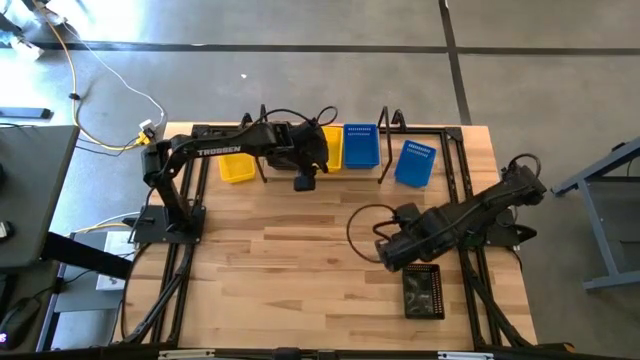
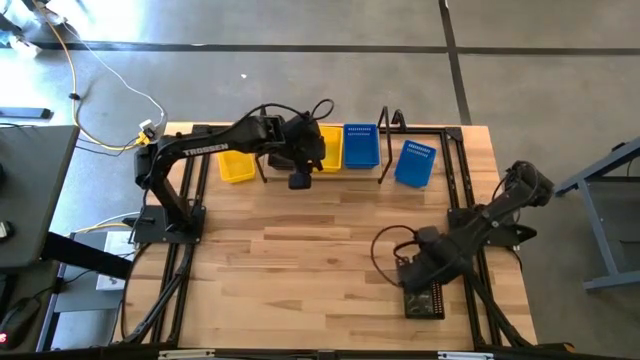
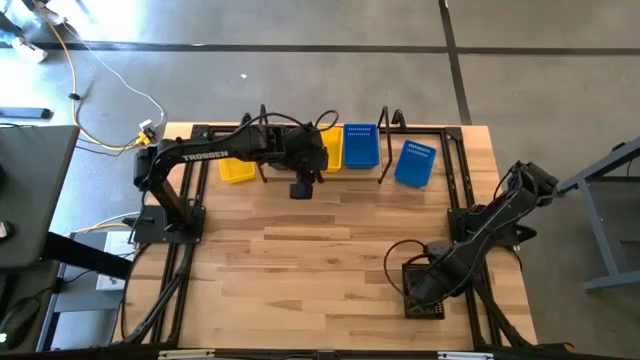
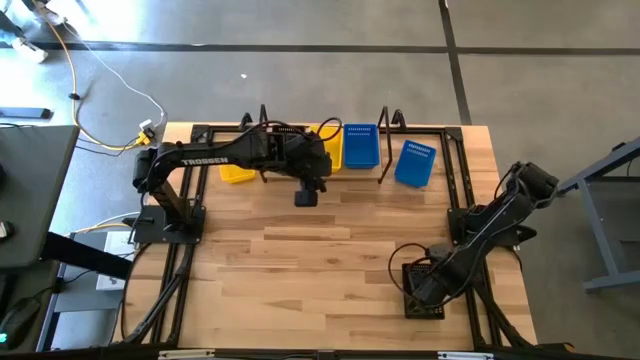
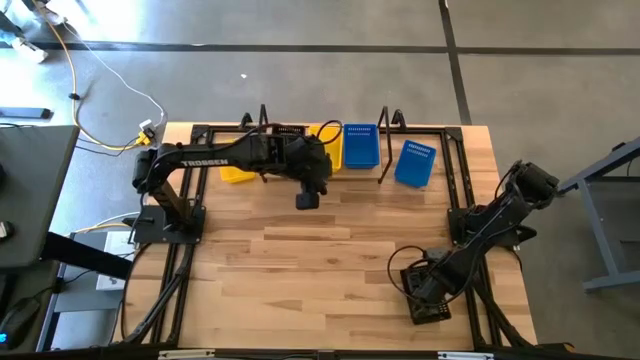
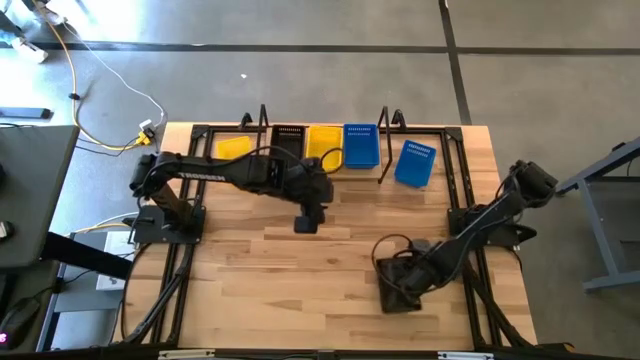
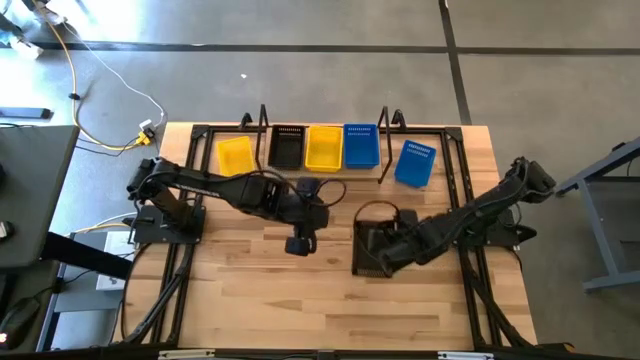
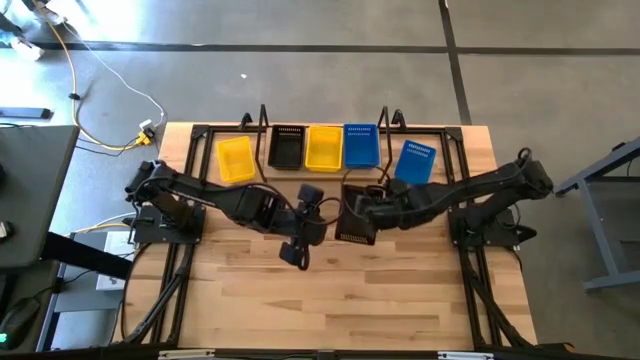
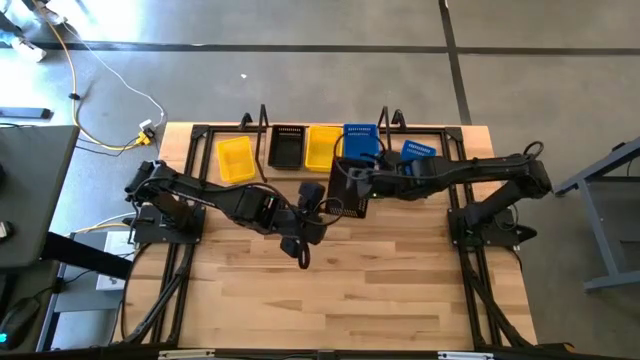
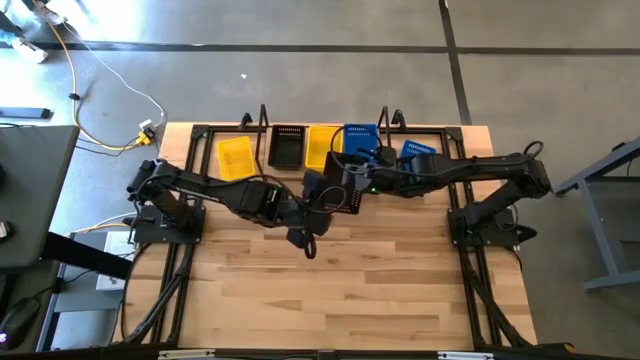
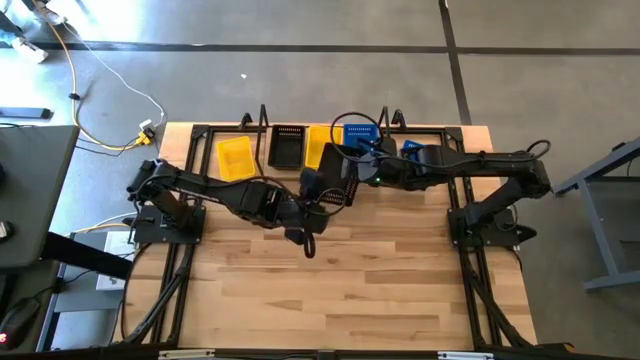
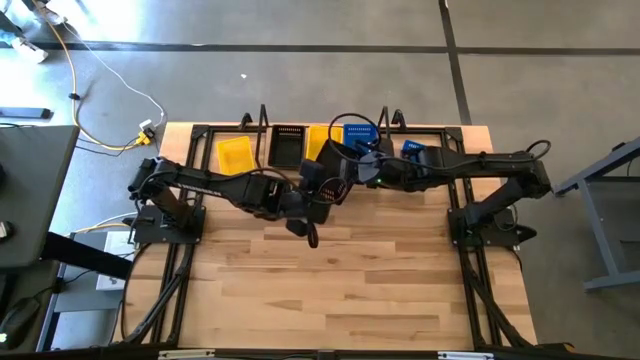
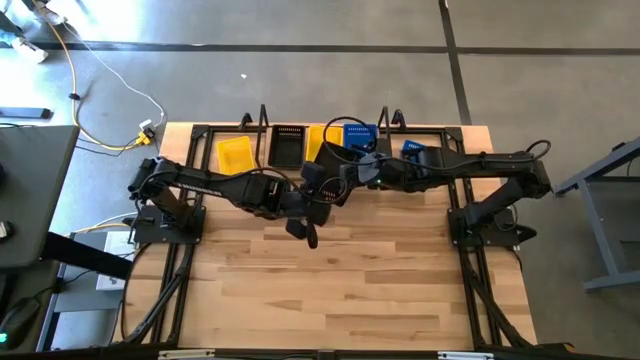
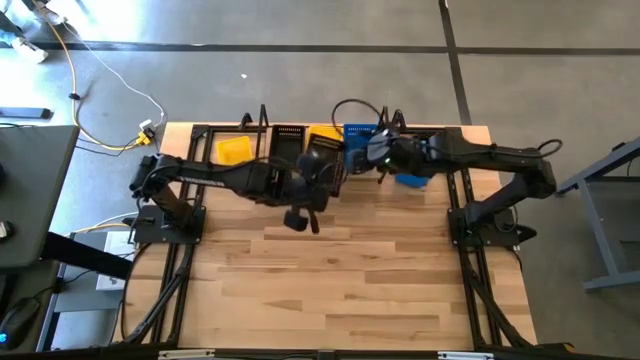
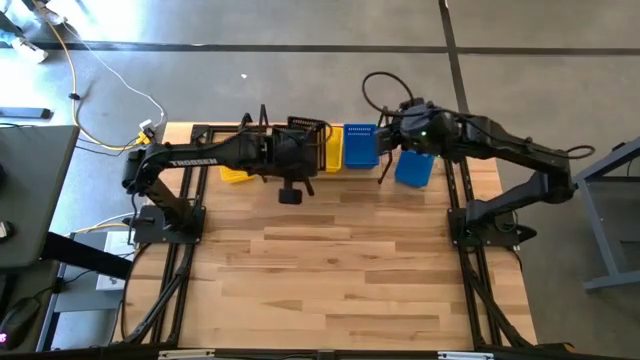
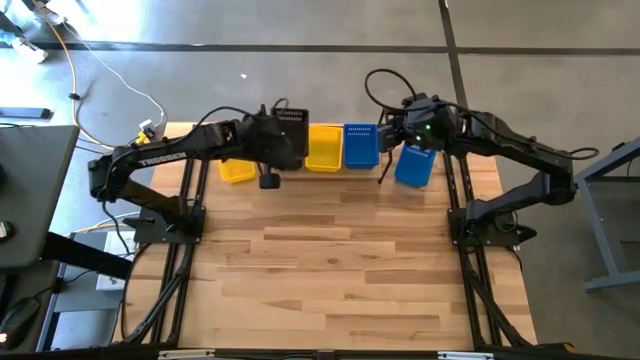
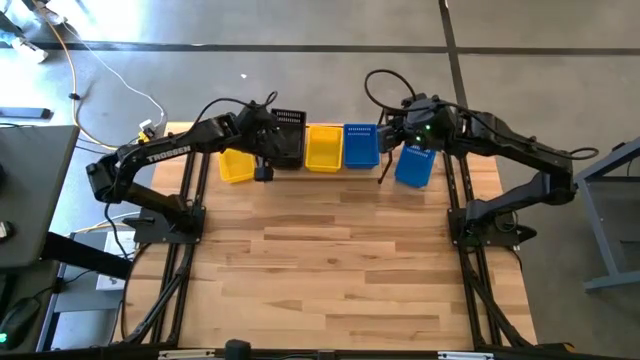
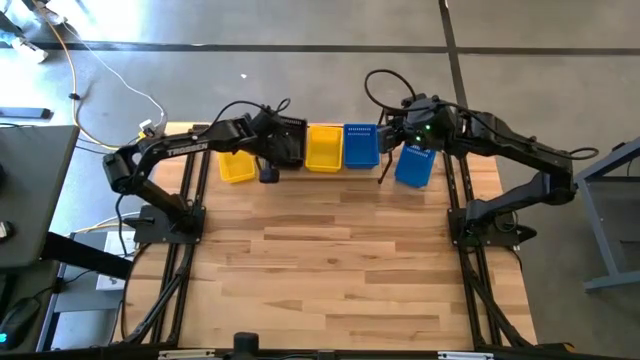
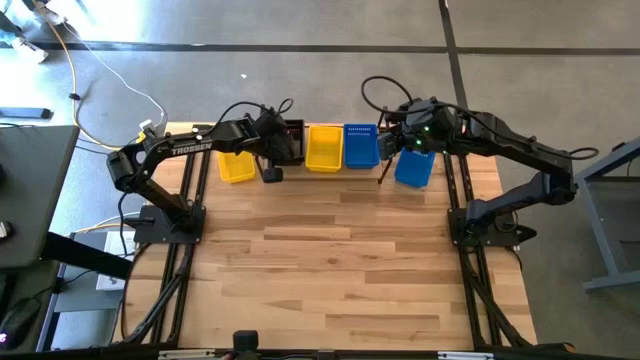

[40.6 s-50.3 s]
Task: Stack baskets on shelf by color
Stack the black bin on the black bin on the shelf

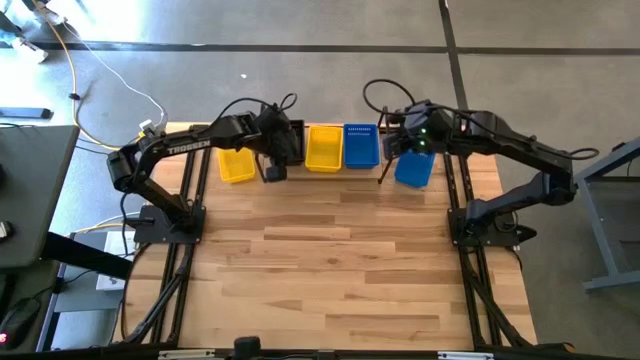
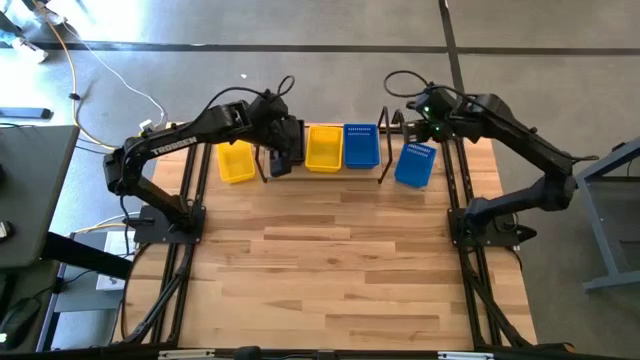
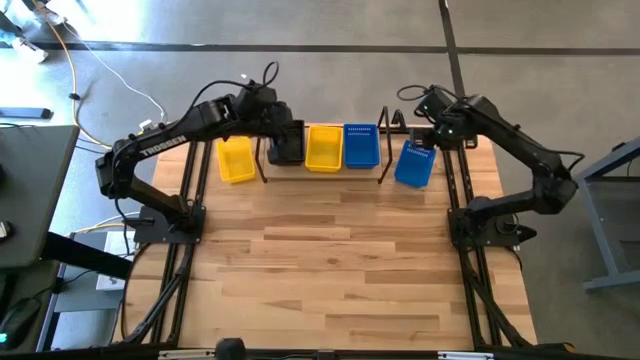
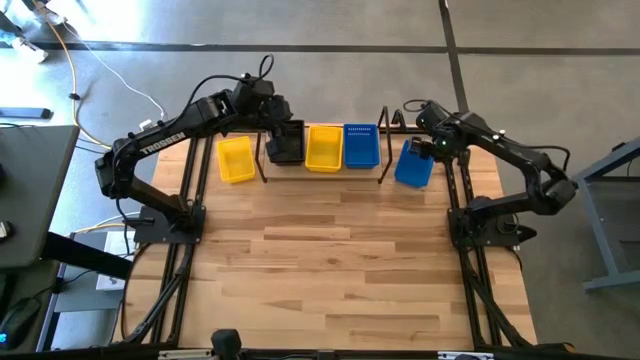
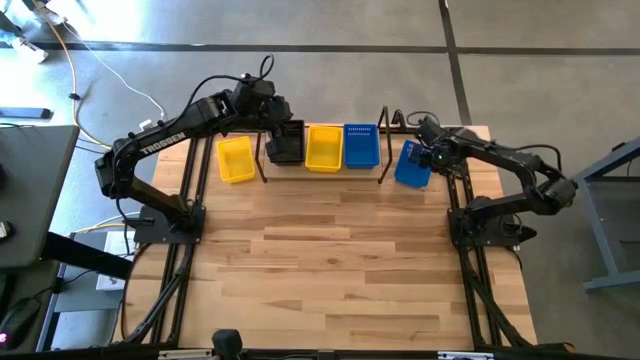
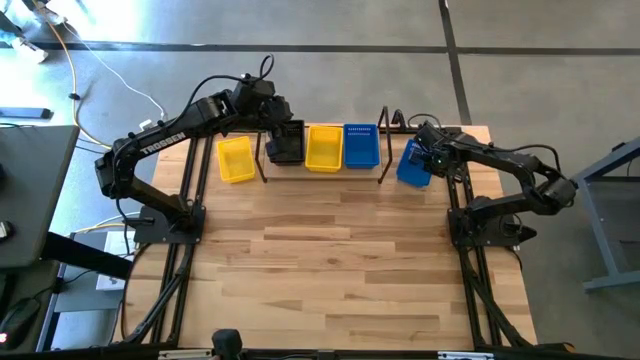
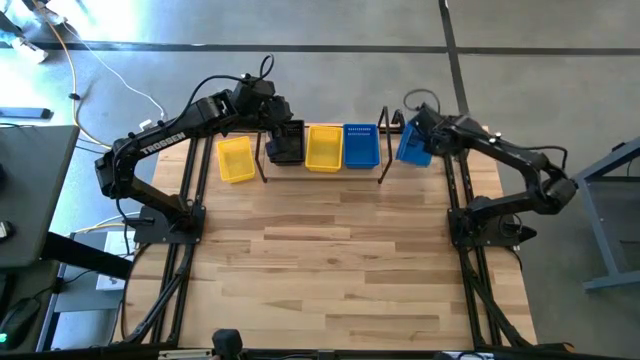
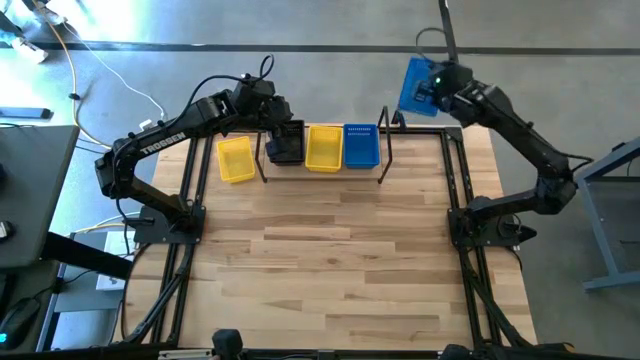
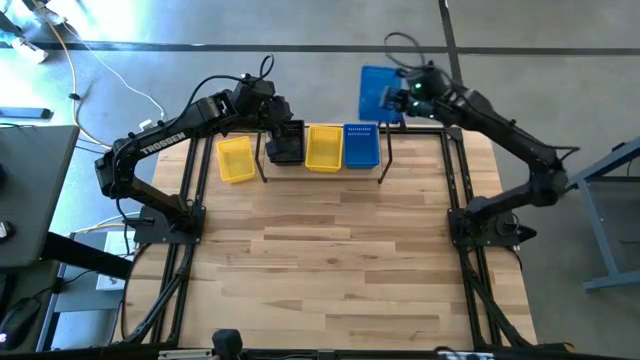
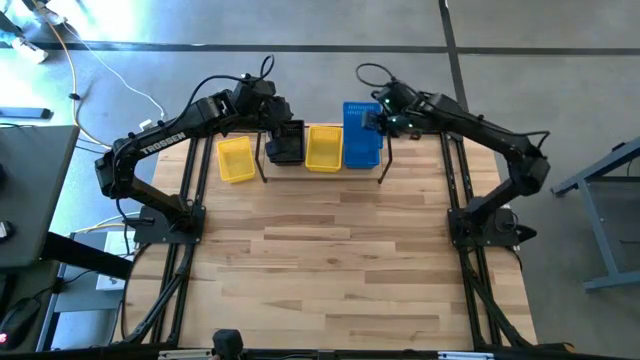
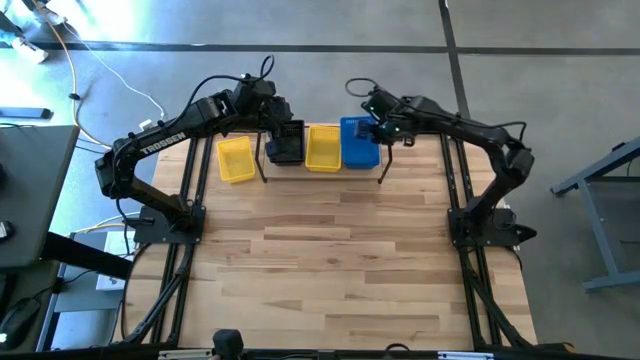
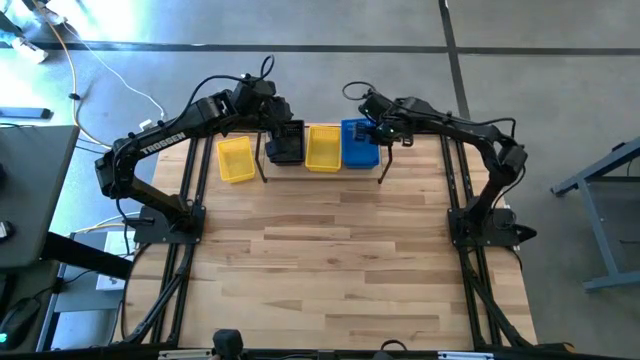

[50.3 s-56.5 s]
Stack the blue bin on the blue bin on the shelf

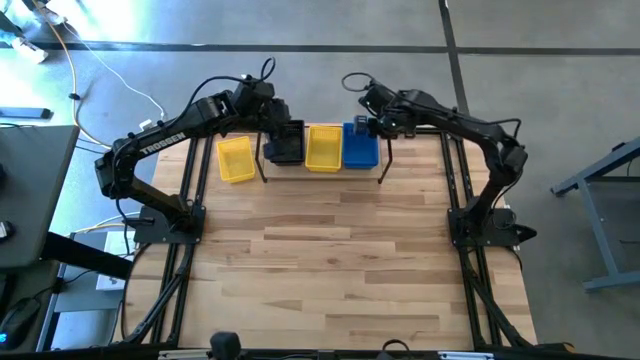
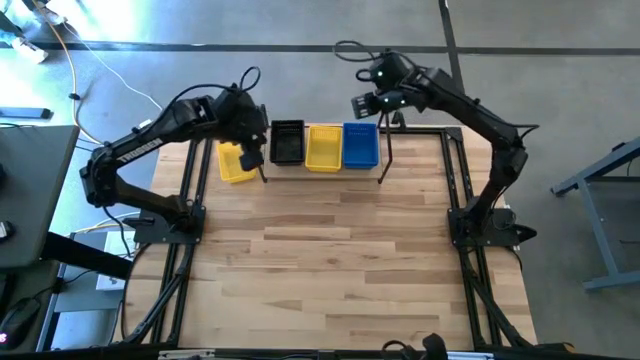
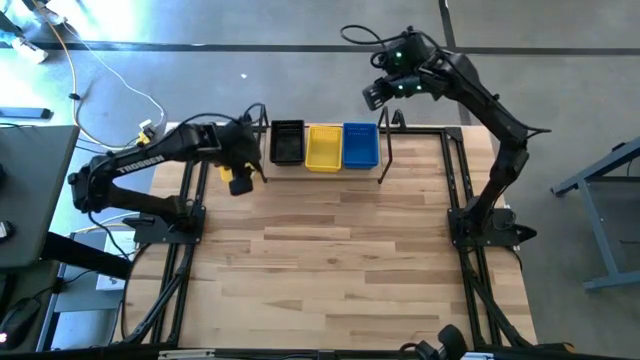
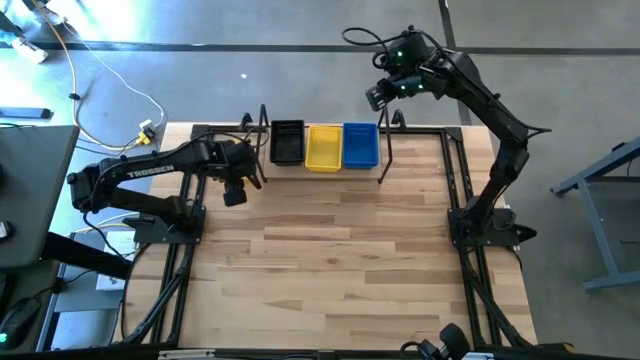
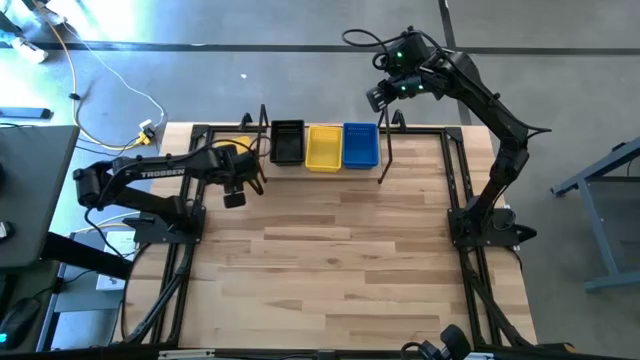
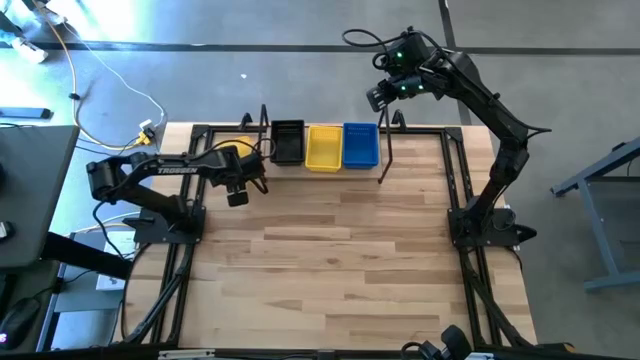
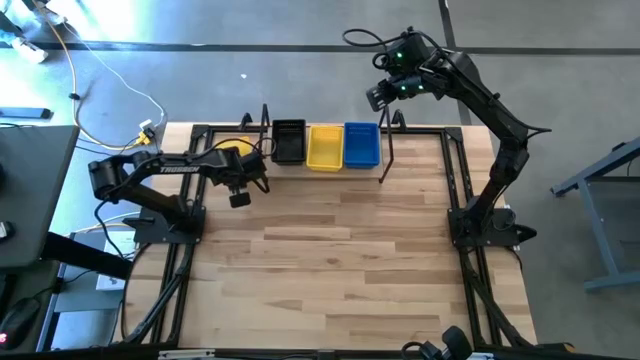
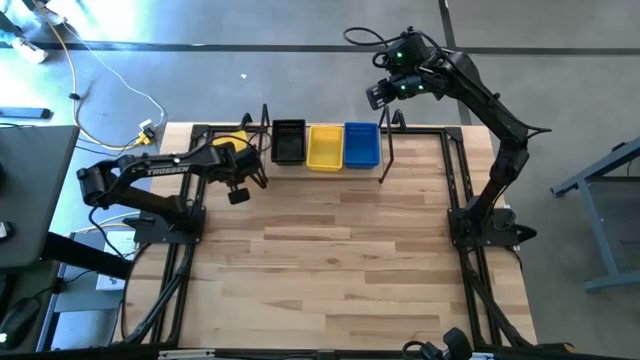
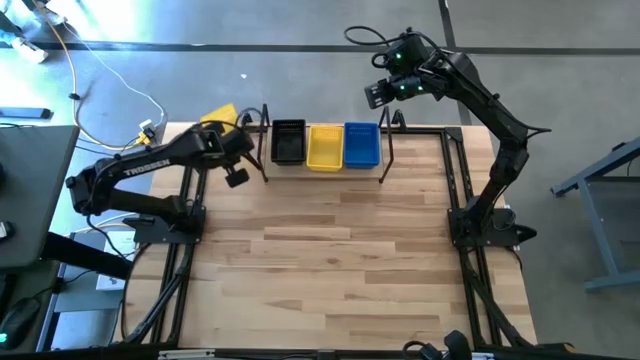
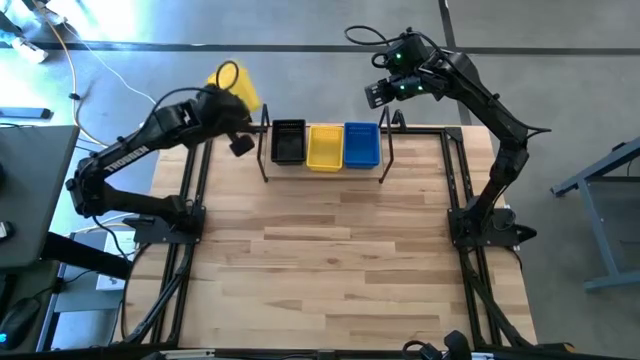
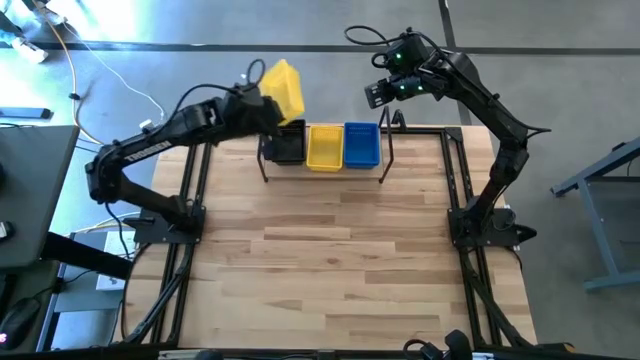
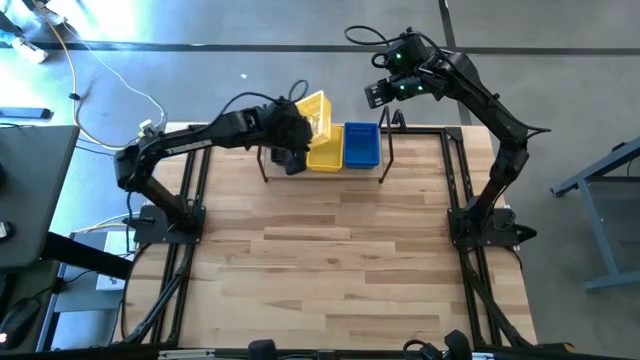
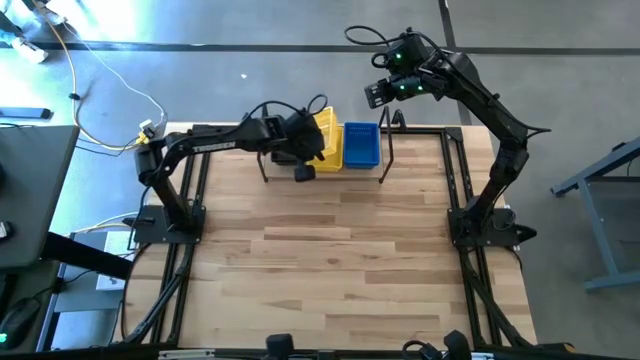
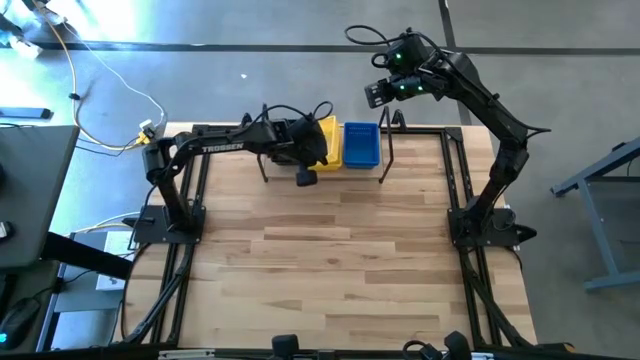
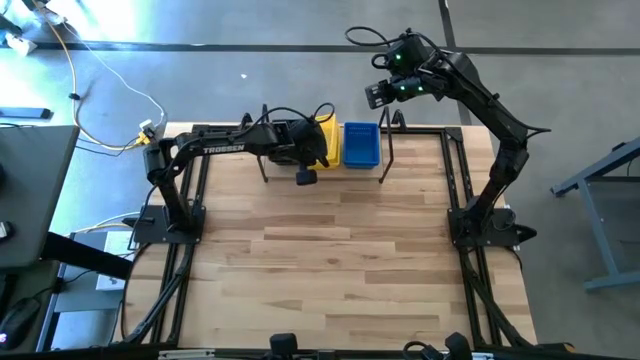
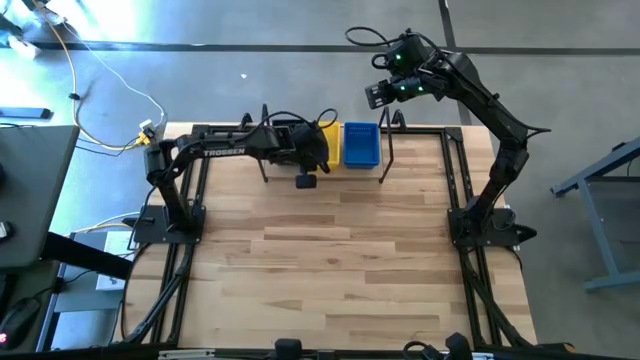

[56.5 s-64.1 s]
Stack the yellow bin on the yellow bin on the shelf
